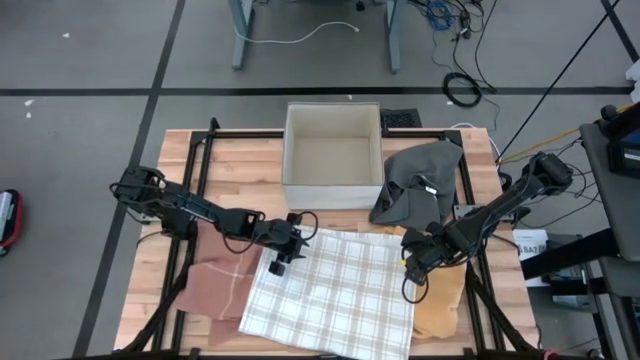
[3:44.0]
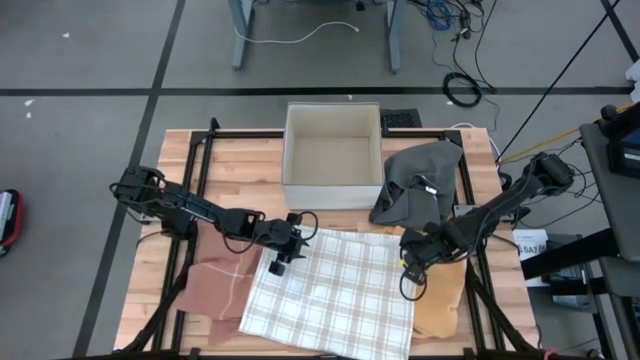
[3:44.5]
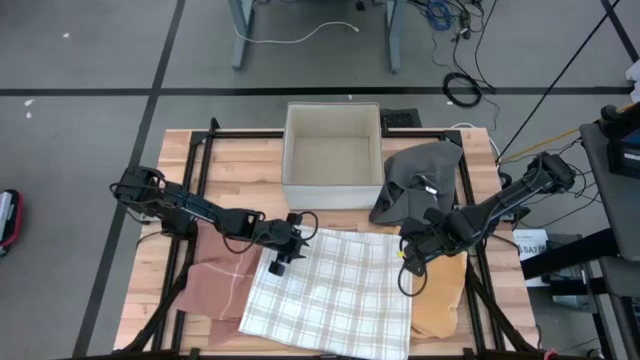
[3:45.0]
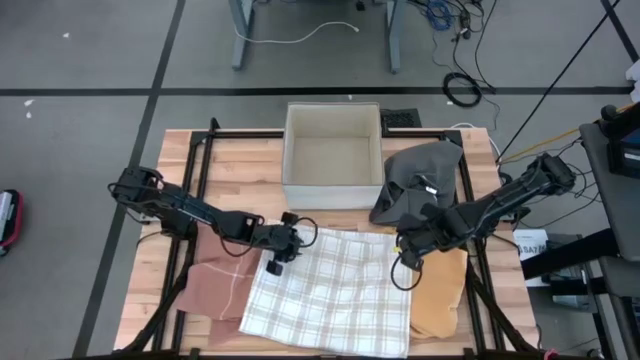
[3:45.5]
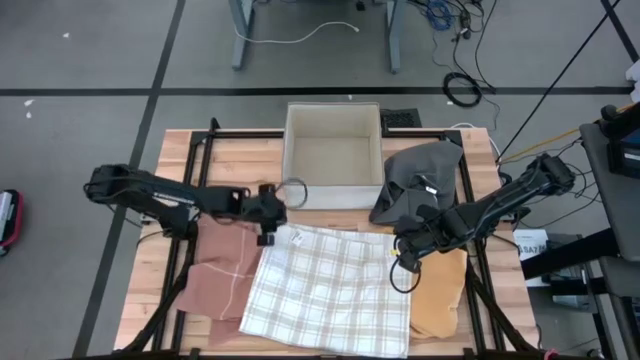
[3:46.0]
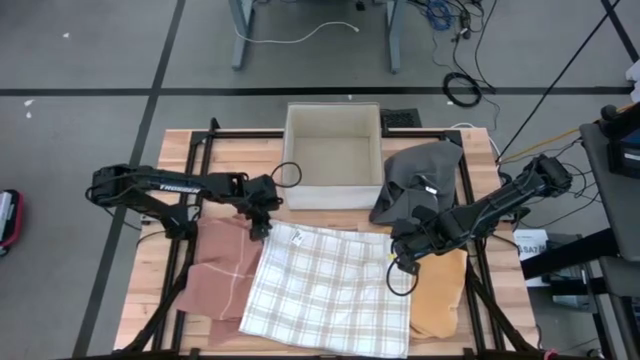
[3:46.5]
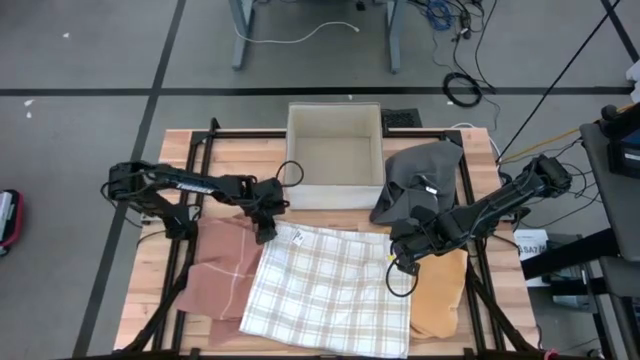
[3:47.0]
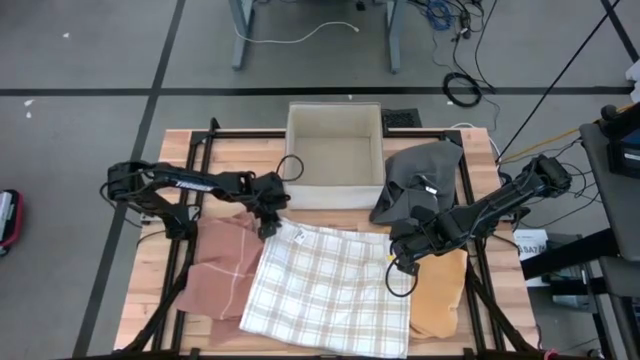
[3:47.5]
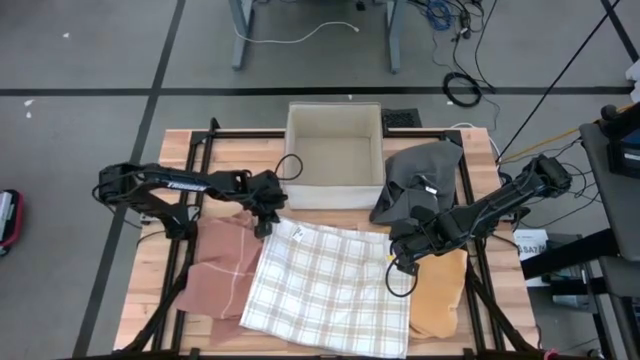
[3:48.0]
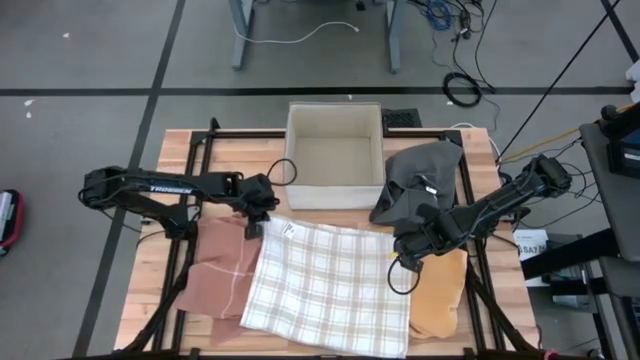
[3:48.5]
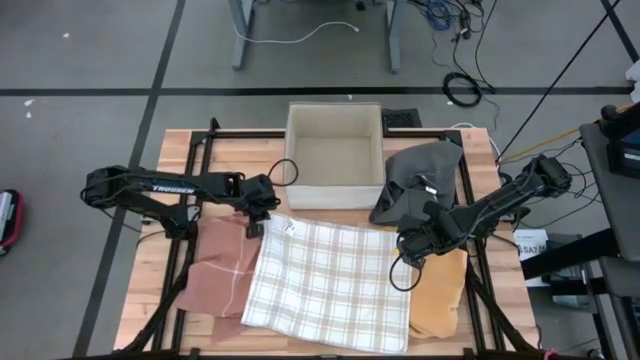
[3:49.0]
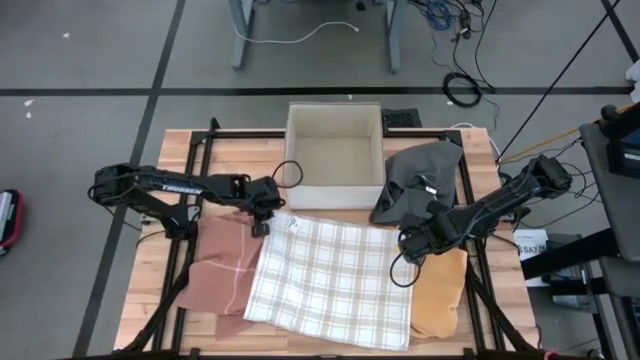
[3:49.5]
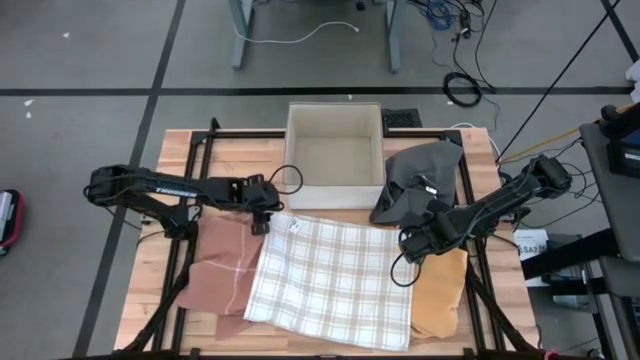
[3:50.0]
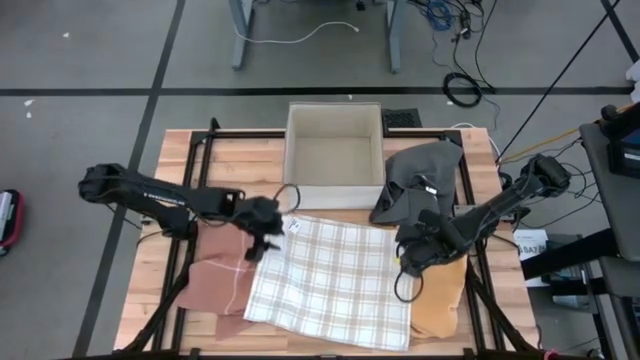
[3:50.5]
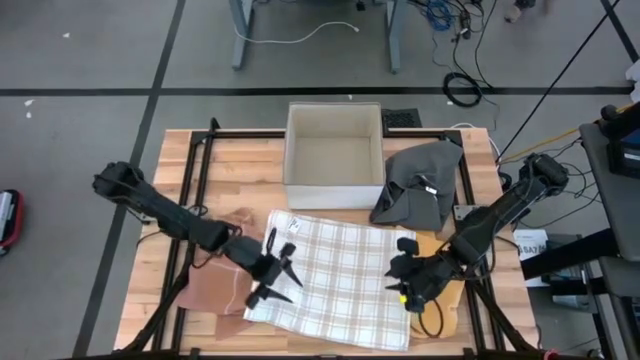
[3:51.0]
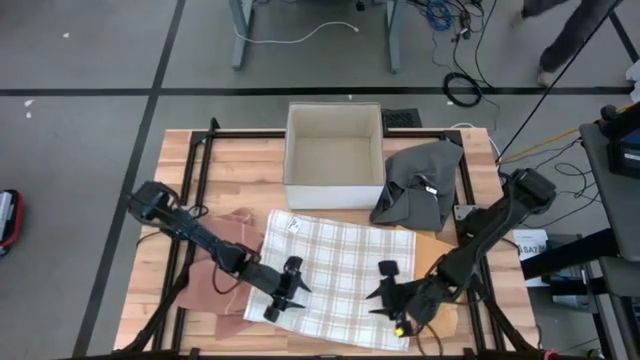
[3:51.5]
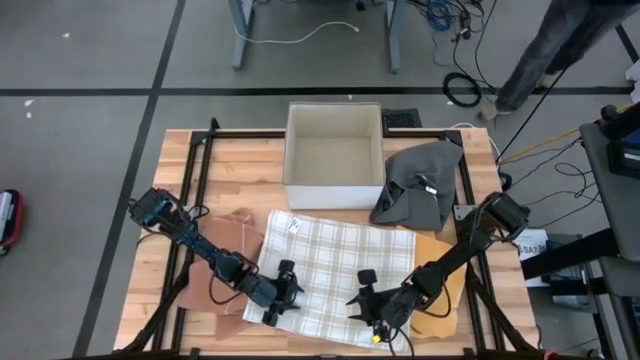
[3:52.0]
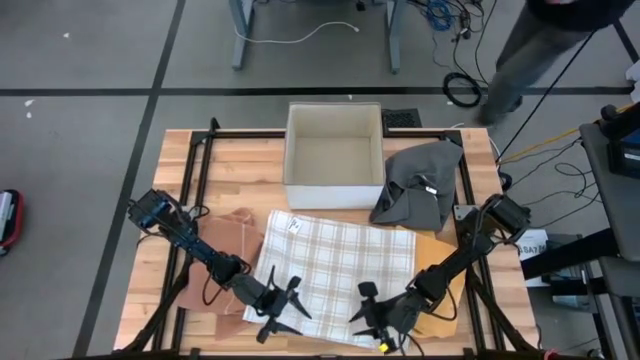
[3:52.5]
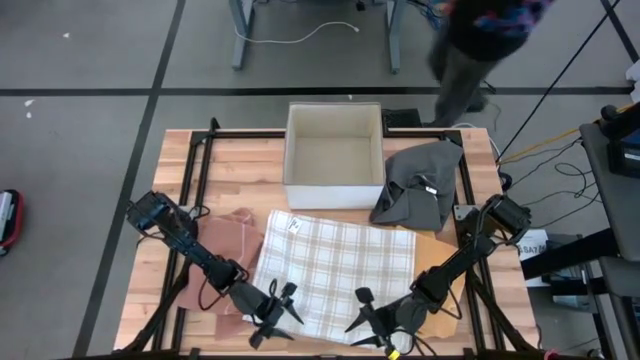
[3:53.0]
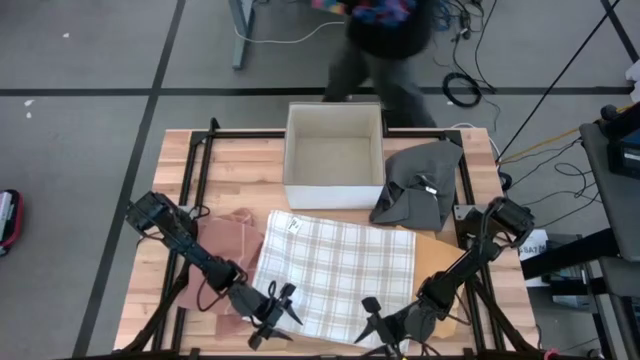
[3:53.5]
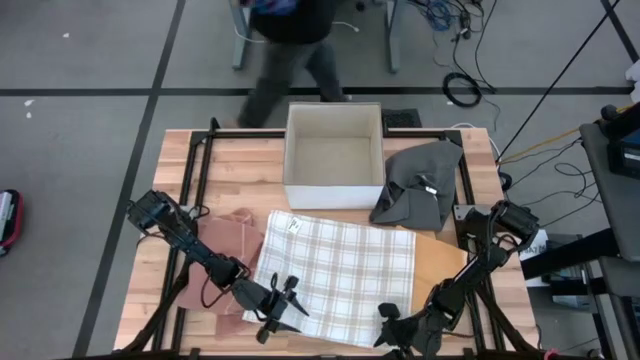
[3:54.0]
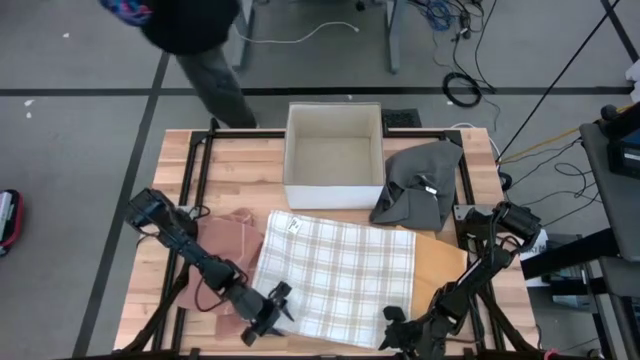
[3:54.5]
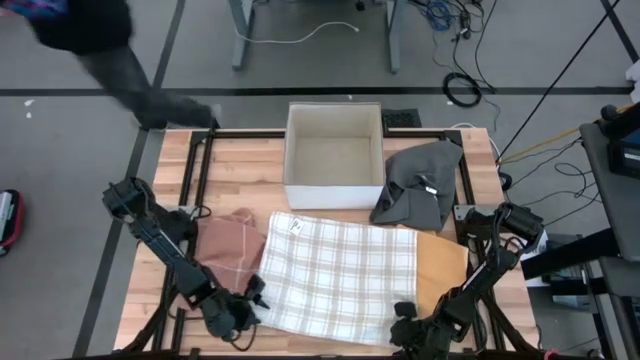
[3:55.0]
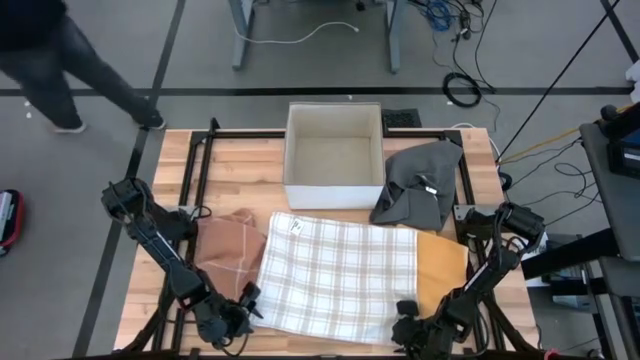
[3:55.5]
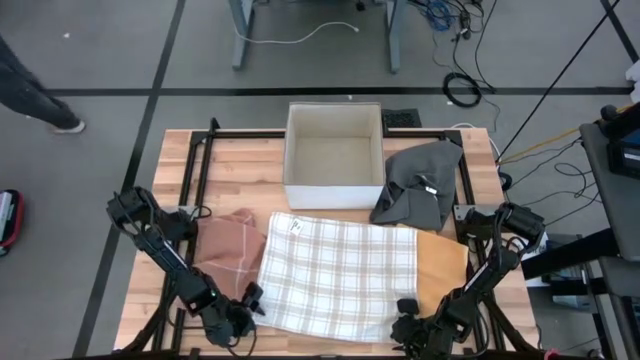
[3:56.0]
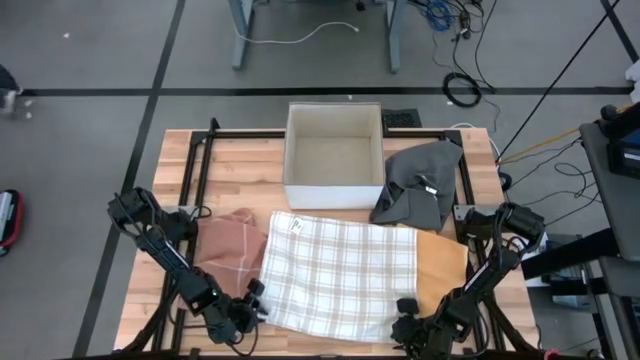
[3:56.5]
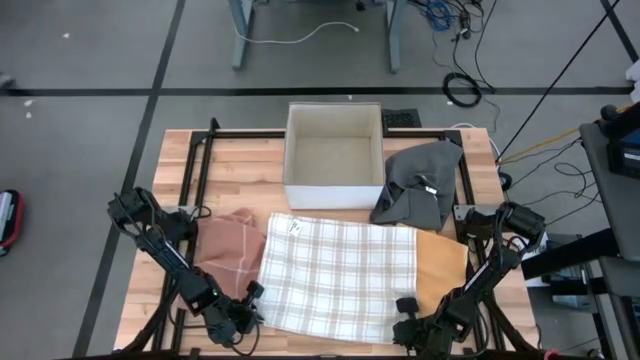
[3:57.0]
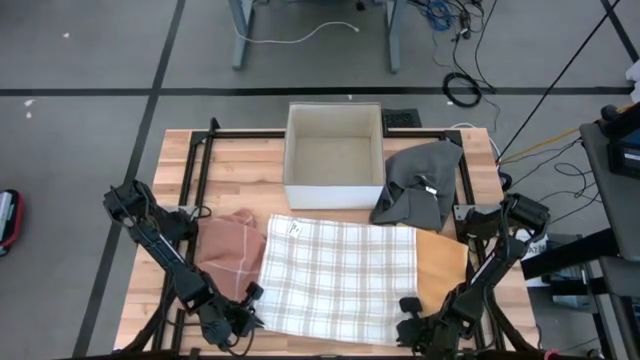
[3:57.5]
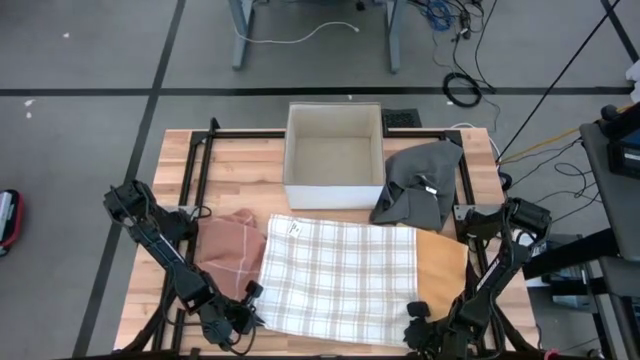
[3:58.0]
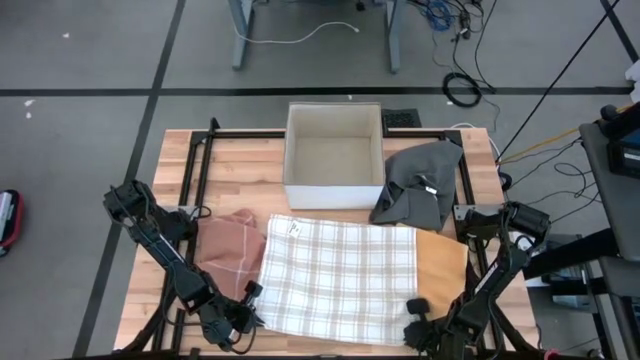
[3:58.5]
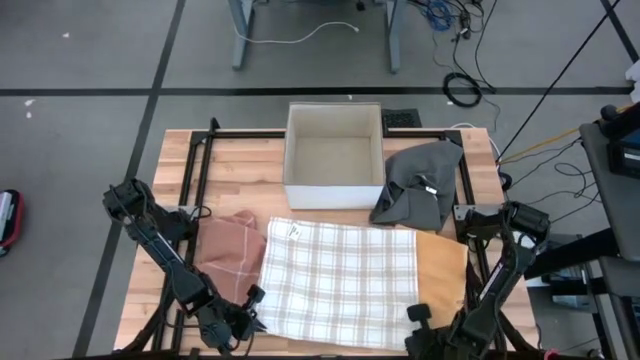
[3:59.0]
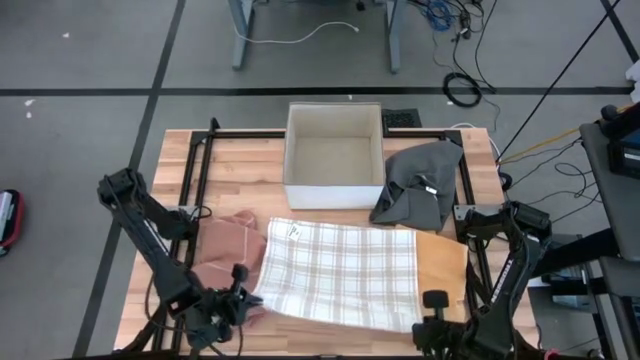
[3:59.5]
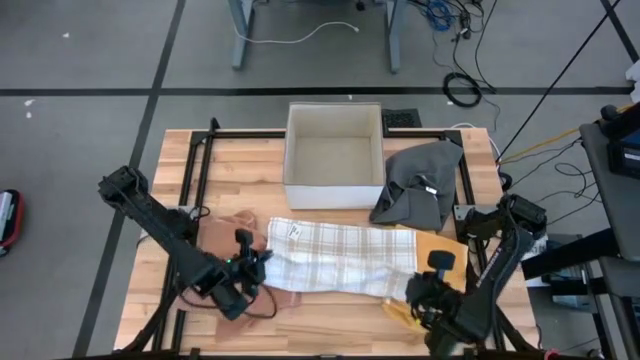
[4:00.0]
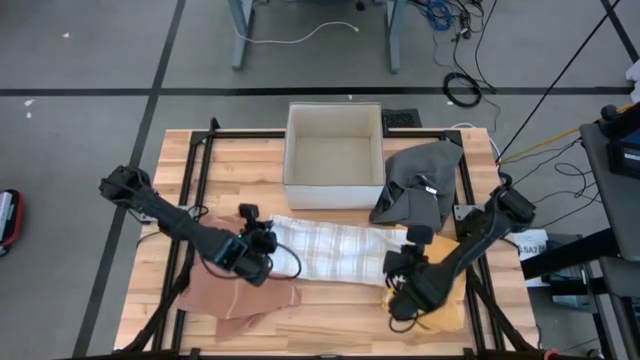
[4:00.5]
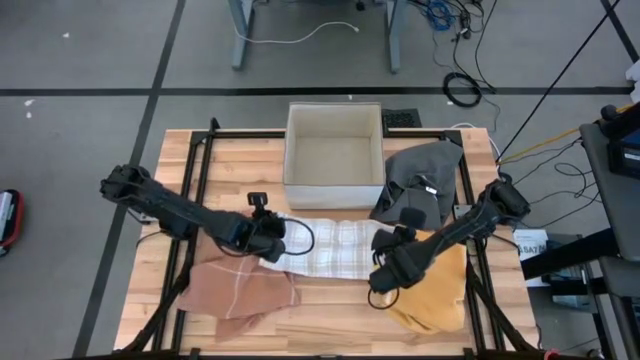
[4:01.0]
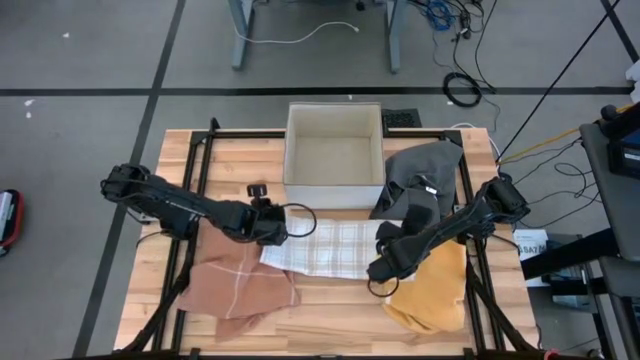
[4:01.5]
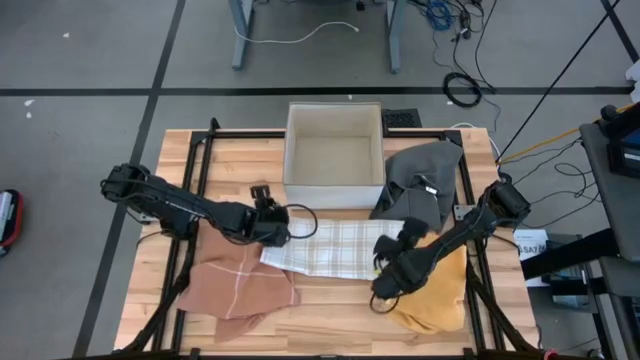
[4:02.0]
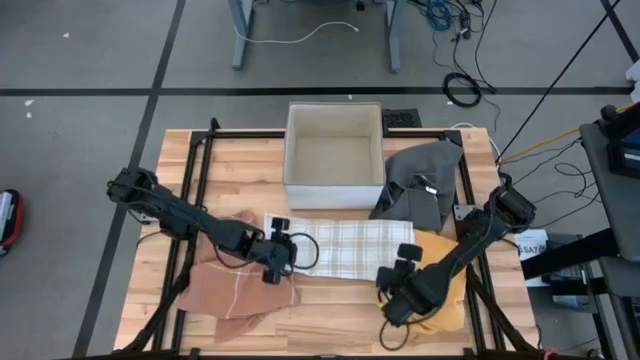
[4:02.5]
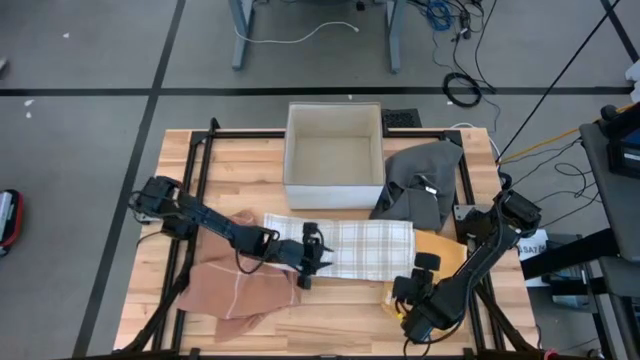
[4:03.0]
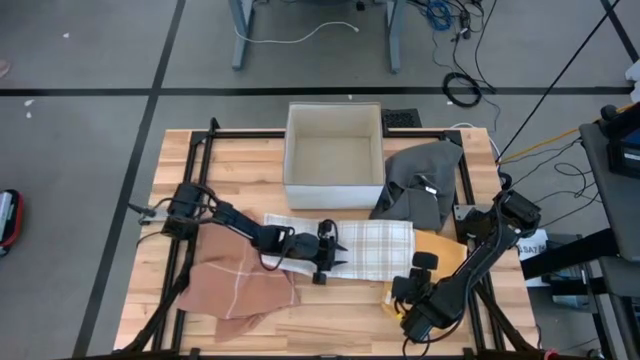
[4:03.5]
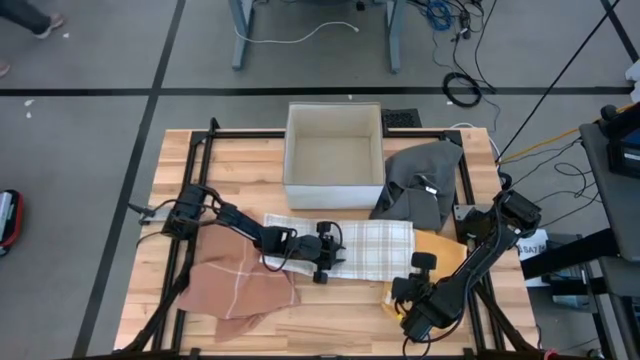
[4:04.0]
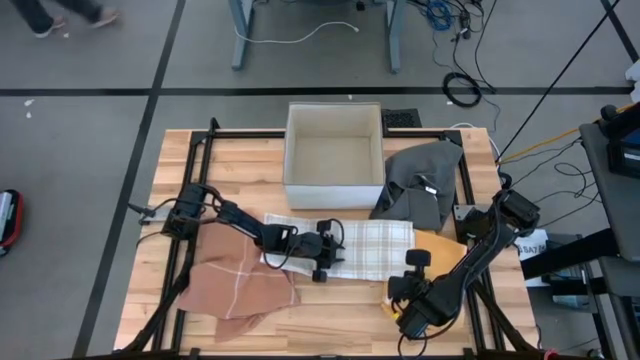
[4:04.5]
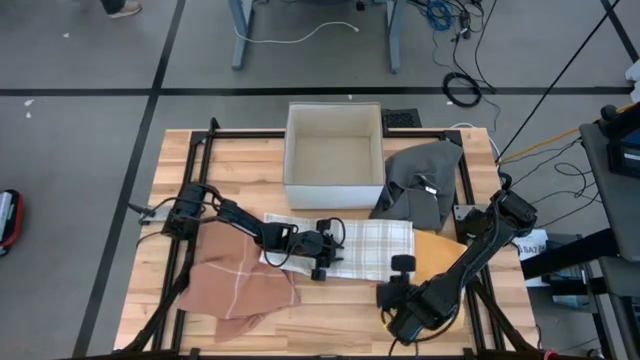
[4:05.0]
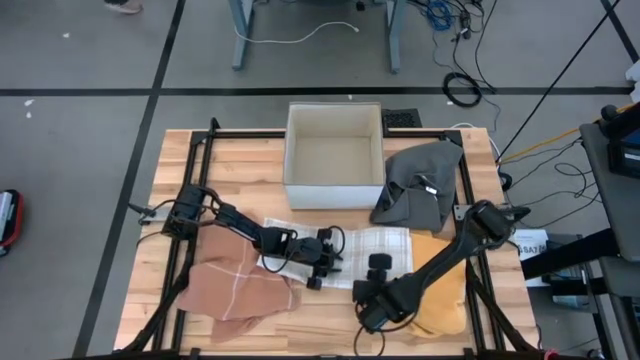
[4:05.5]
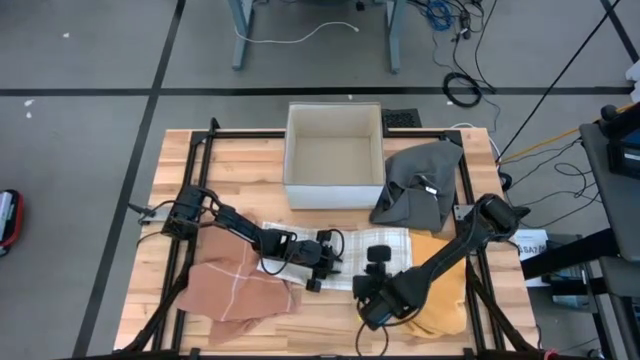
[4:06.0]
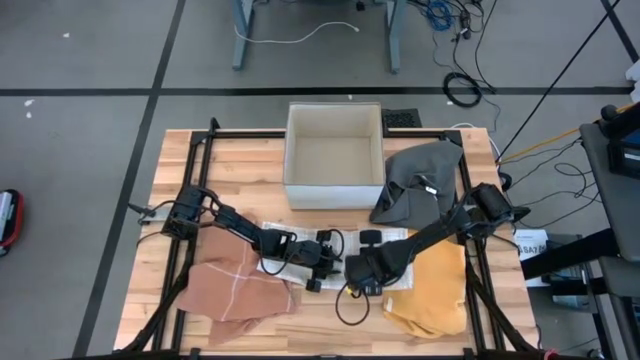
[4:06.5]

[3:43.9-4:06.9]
Task: Fold towel
Fold the white patterned towel
